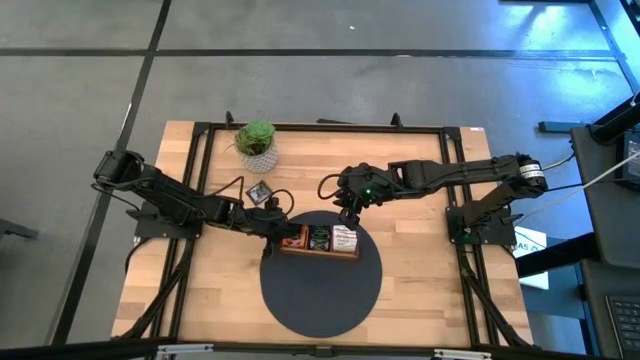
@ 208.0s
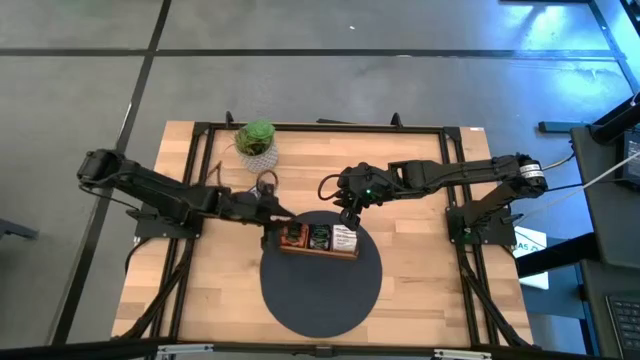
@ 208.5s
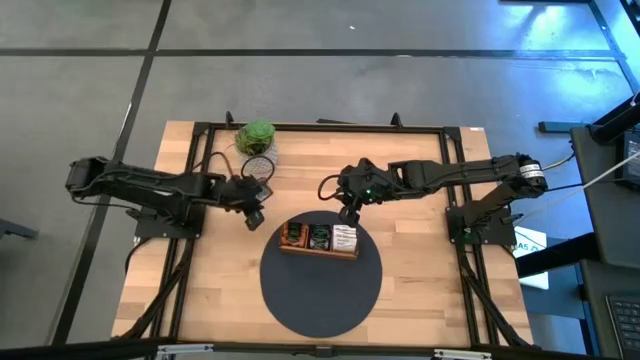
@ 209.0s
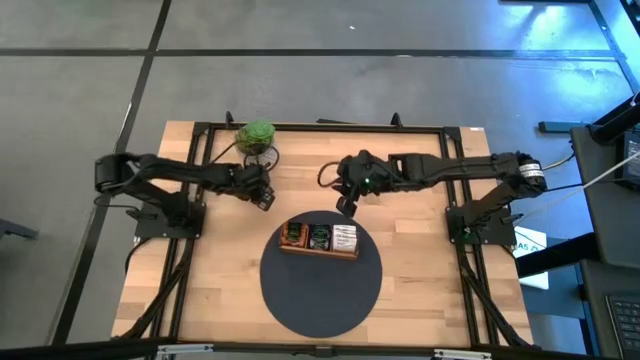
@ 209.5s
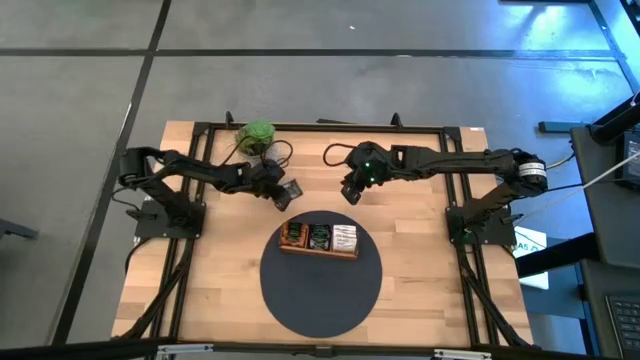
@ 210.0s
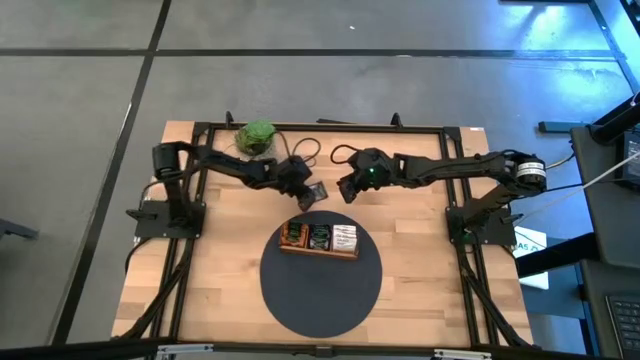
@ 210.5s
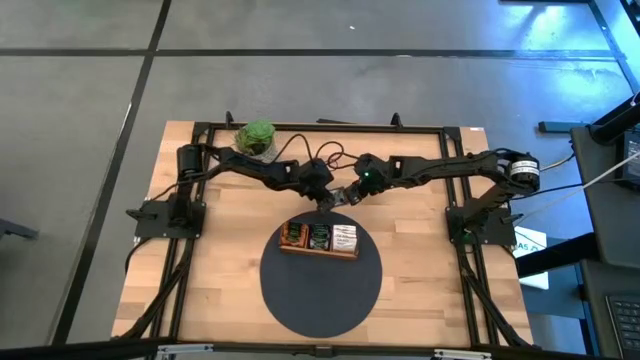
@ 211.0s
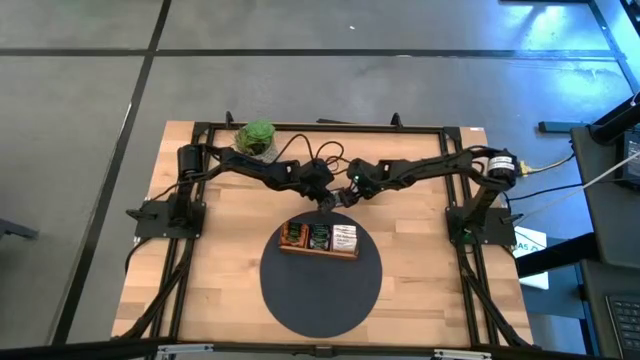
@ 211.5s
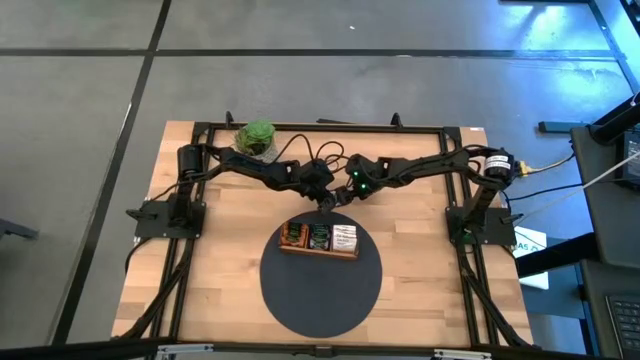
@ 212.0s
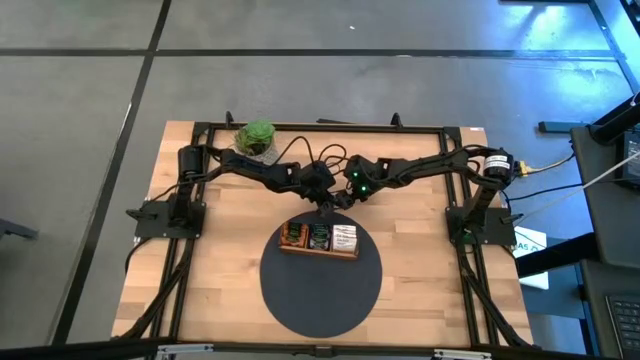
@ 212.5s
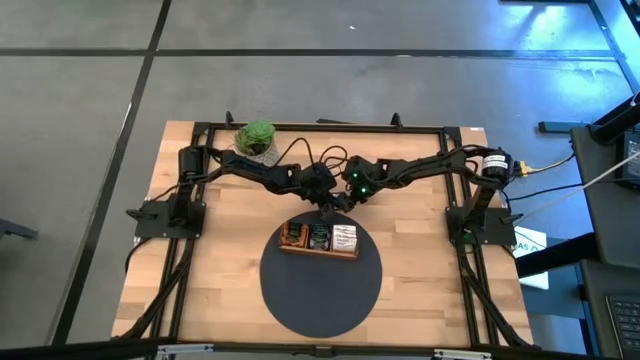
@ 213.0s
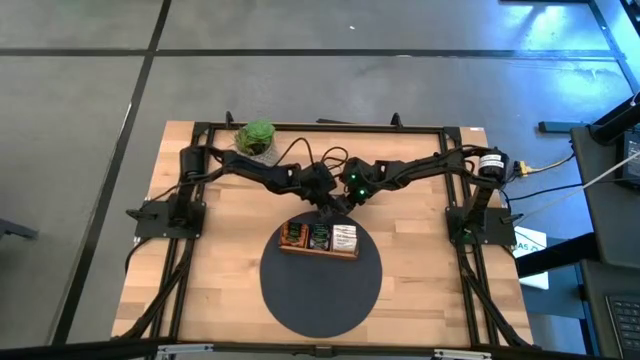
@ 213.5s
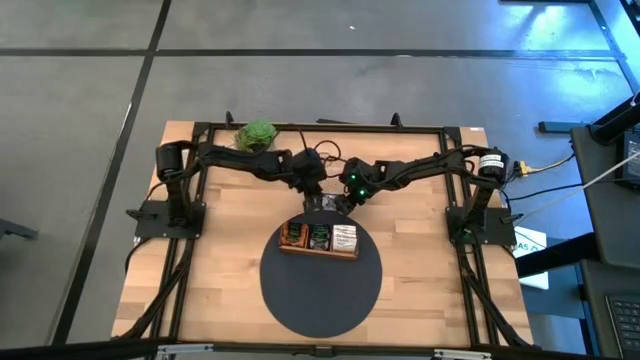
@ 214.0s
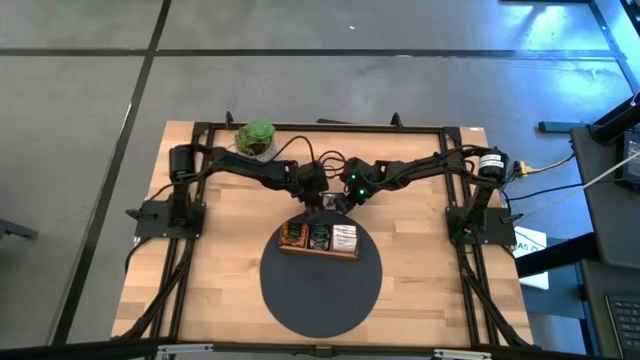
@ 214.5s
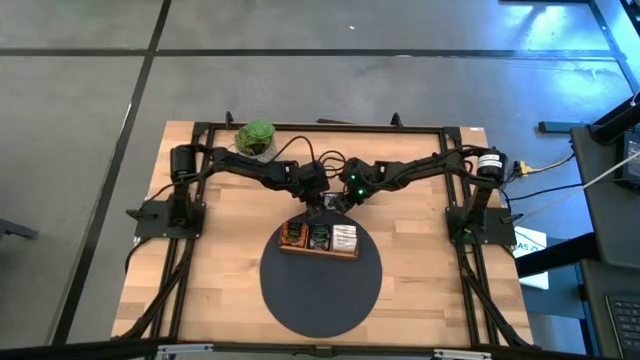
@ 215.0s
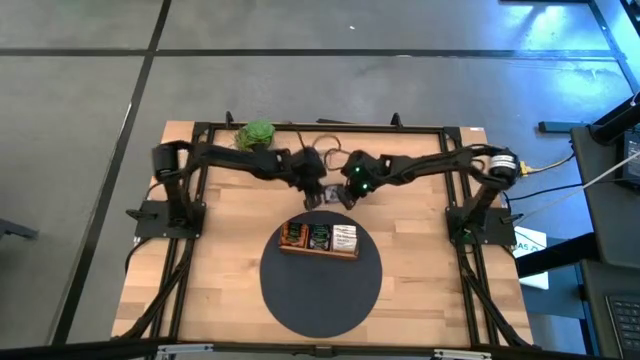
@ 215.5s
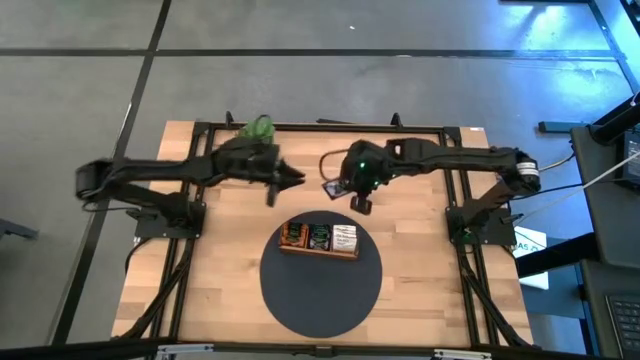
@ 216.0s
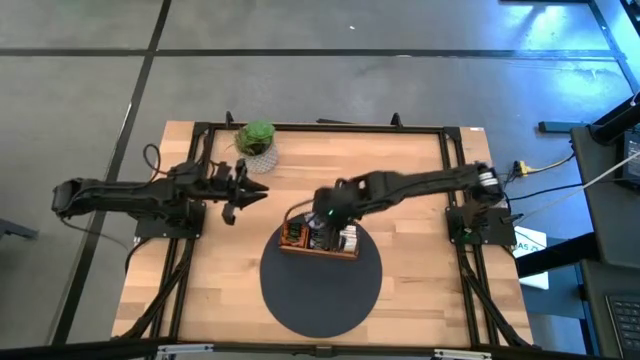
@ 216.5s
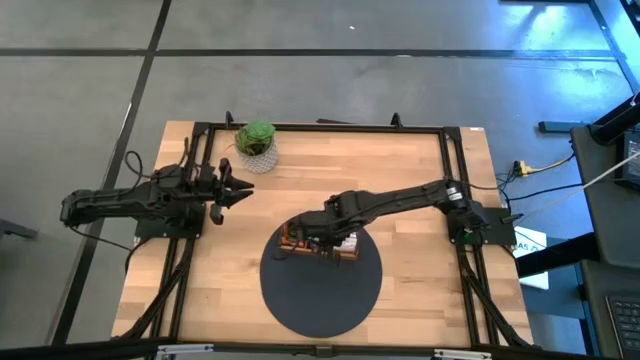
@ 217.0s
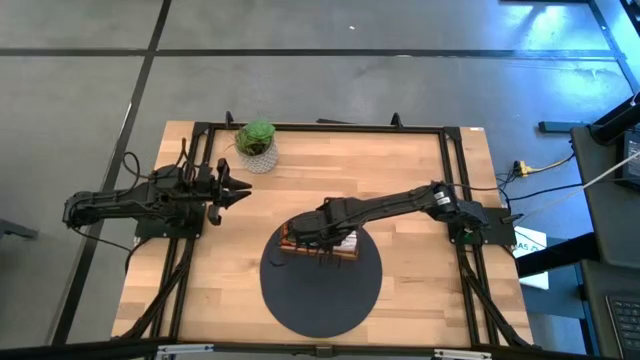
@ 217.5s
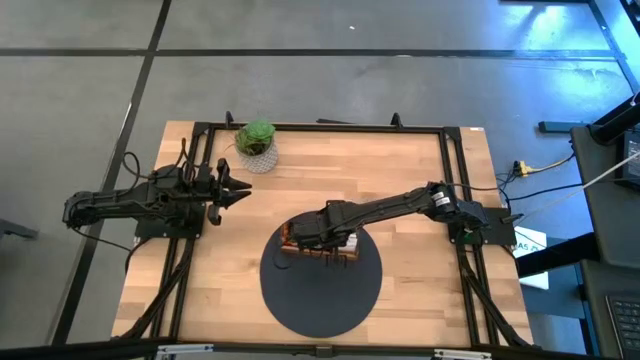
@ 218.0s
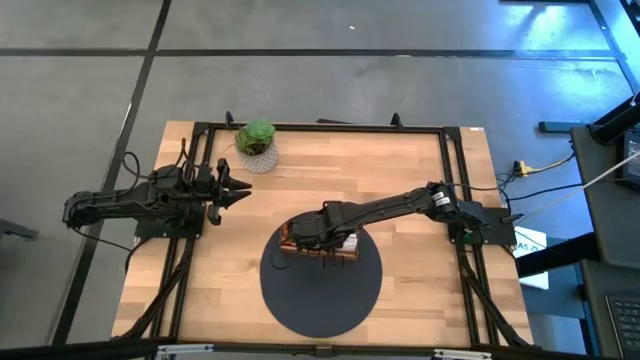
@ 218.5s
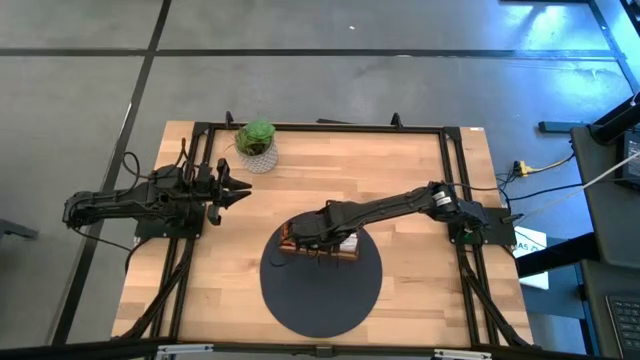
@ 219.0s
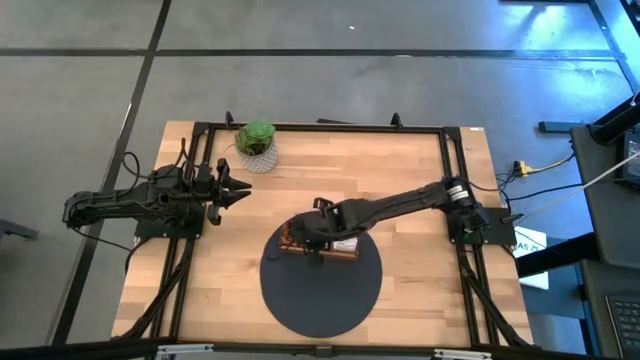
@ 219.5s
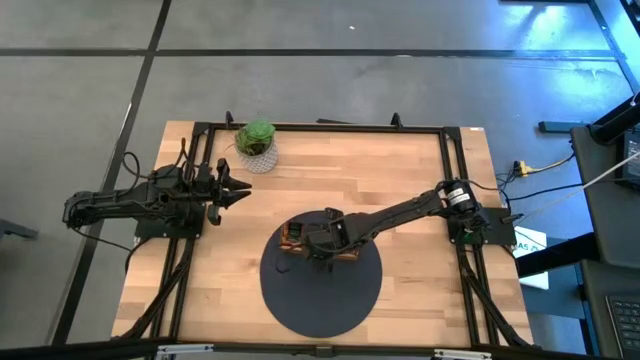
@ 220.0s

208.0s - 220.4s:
Task: Pick & Place Tea
Put the violet tea bag into the middle slot of the wooden organizer

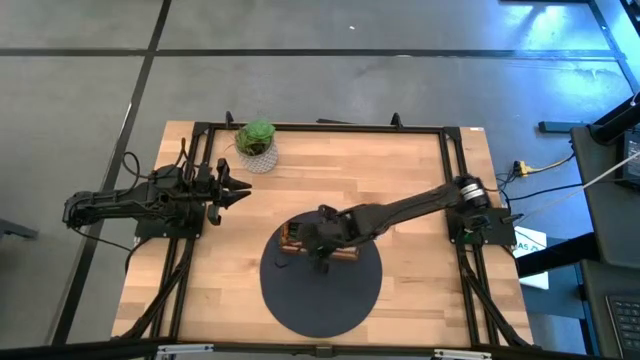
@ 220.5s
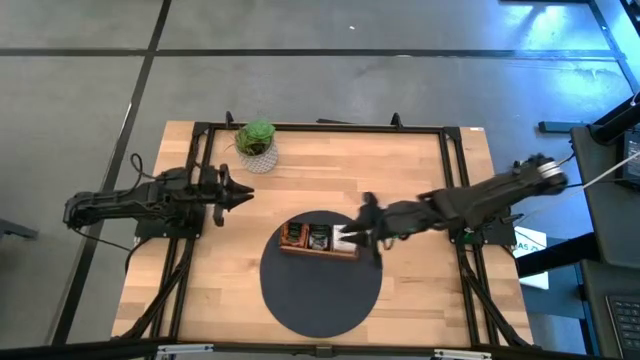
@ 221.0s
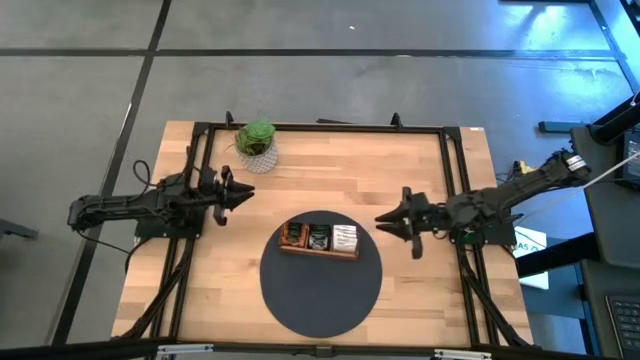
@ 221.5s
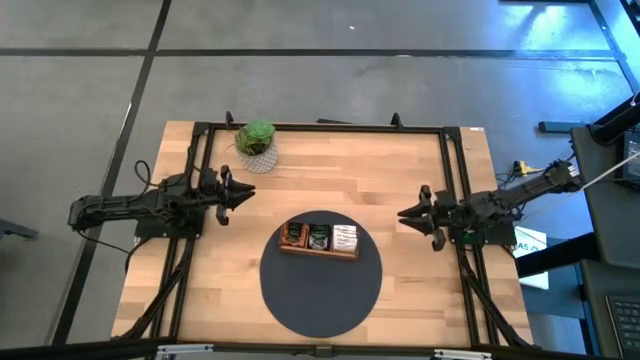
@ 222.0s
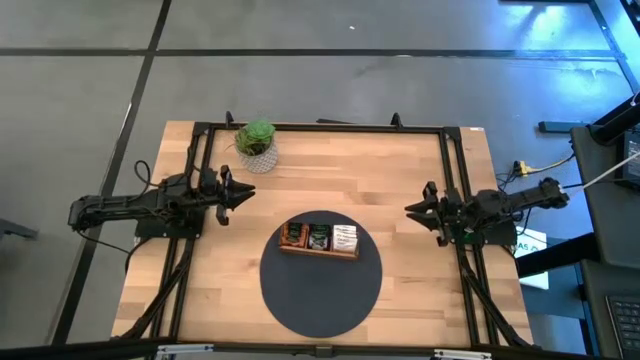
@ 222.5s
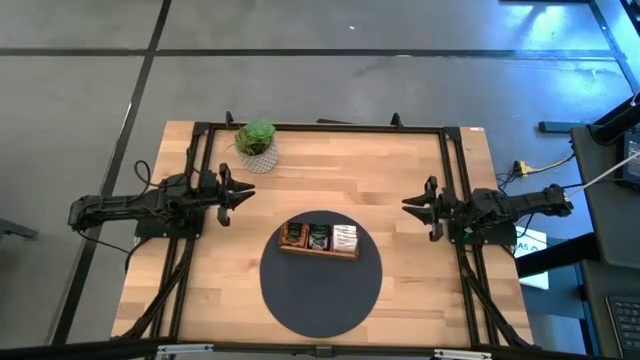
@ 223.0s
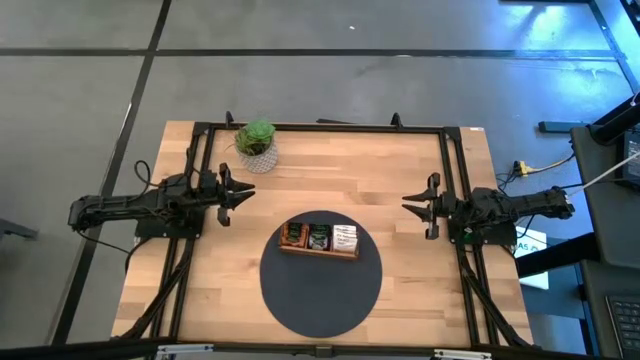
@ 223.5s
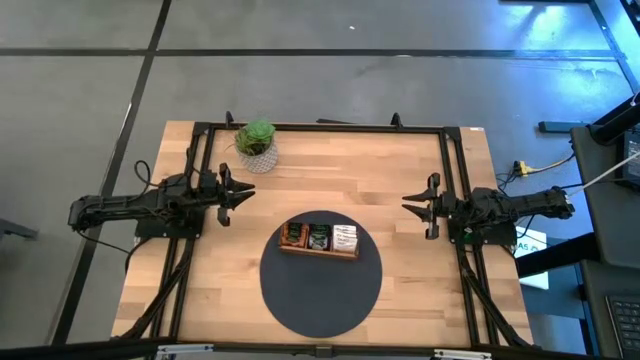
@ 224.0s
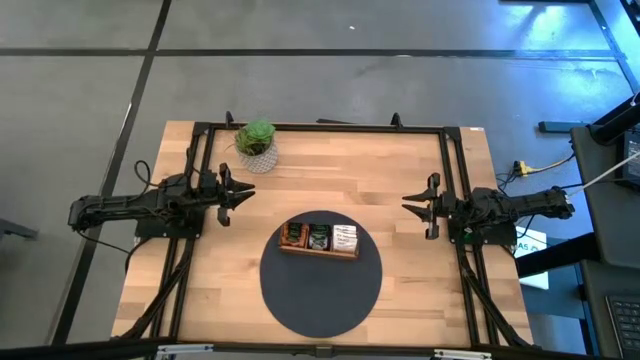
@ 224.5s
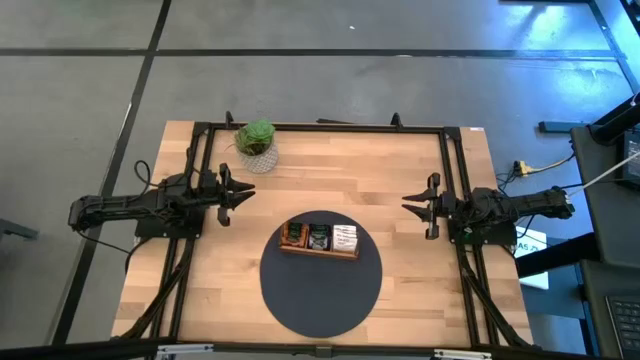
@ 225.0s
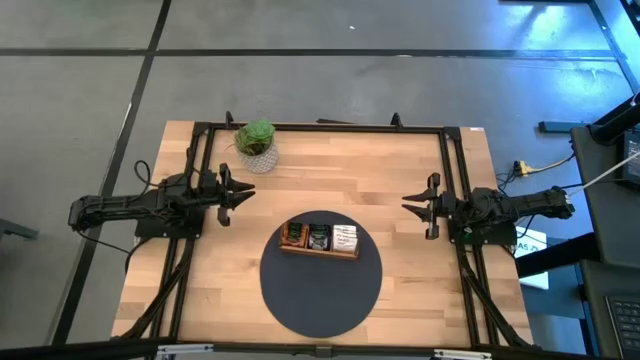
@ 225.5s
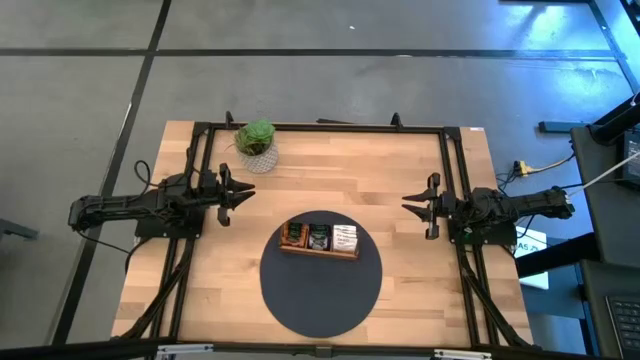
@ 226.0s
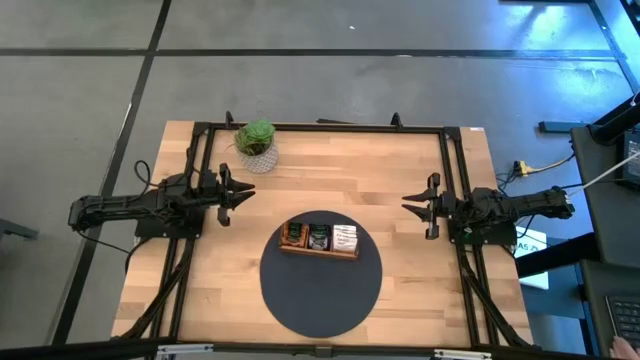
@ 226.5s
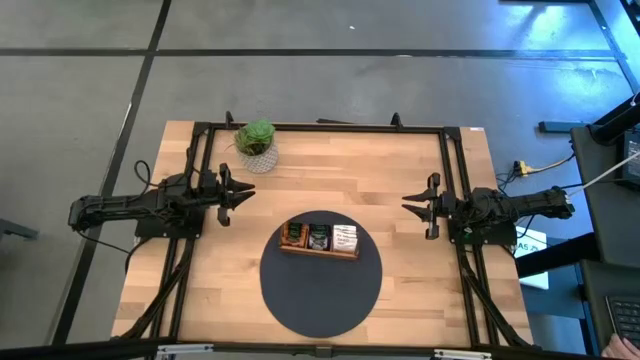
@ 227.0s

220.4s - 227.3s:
Return to Home Position

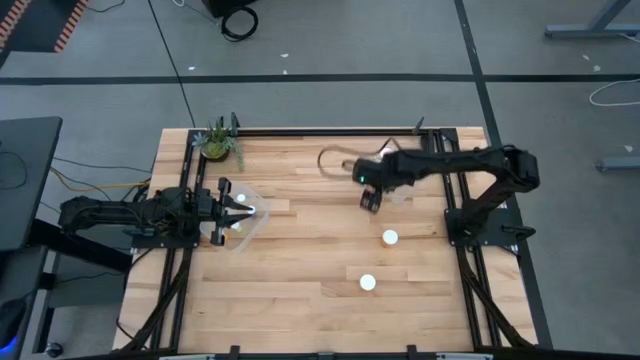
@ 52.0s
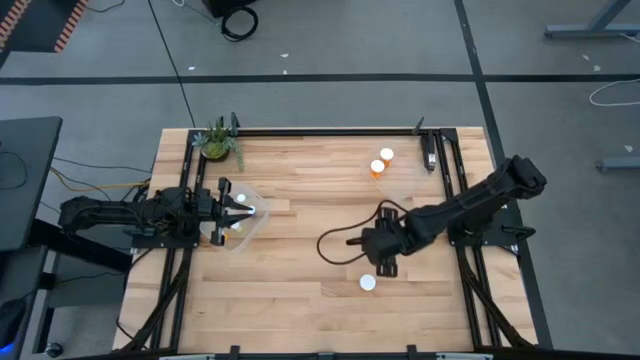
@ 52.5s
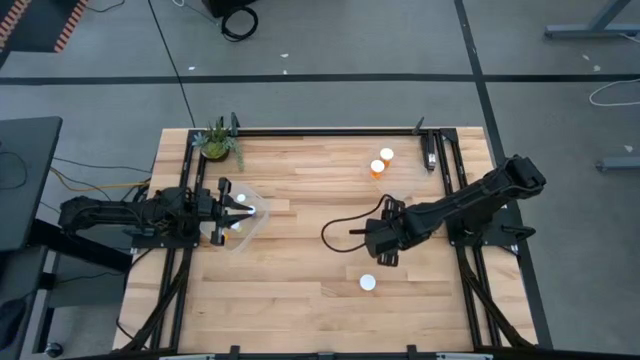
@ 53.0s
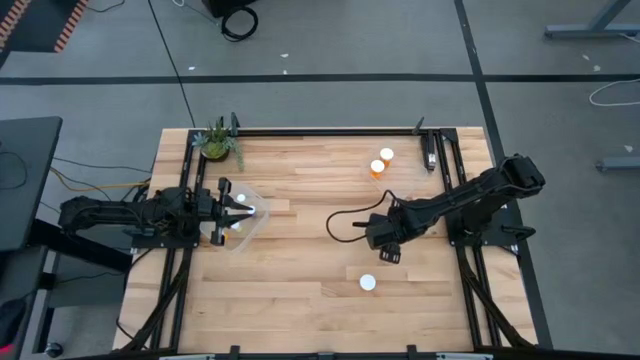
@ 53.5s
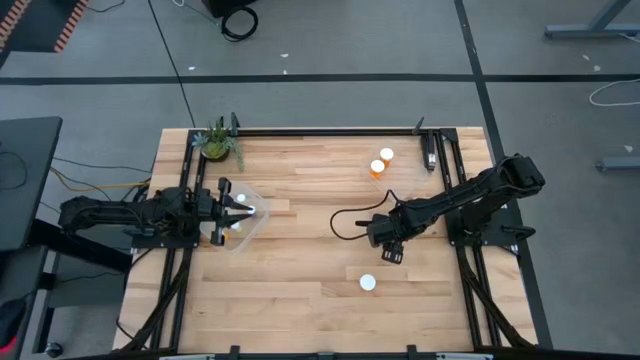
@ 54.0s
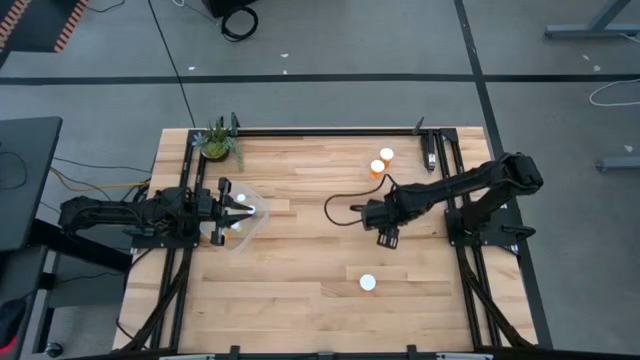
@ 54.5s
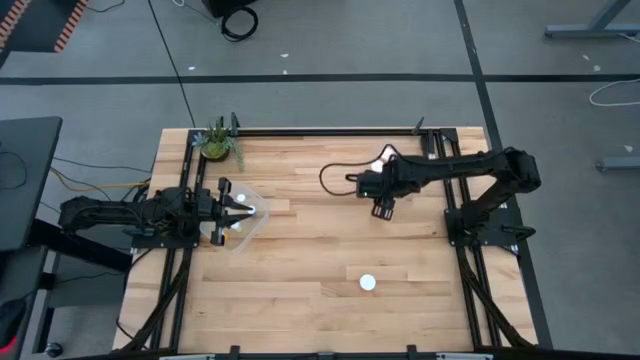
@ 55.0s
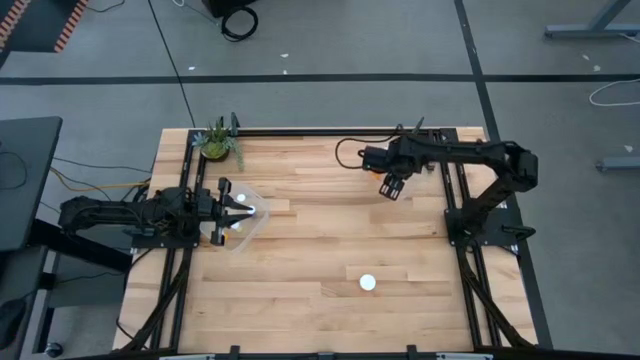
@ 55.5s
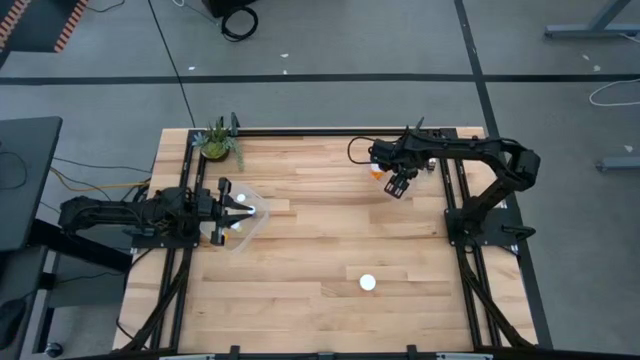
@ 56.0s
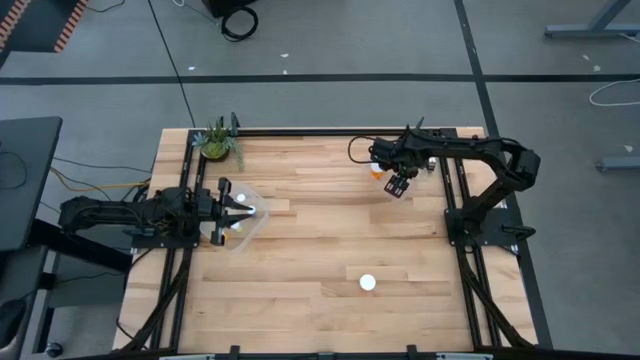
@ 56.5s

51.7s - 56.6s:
Task: Pick and place medicine bottles into bin by pill shape (circle, oval)
Put the large orange pill bottle into the right transparent bin
